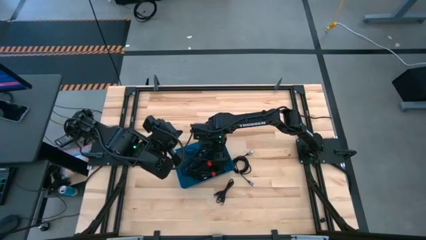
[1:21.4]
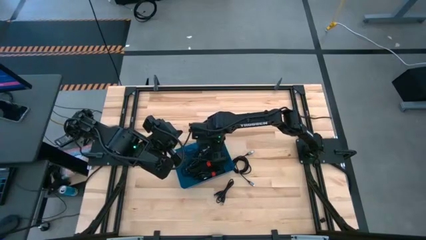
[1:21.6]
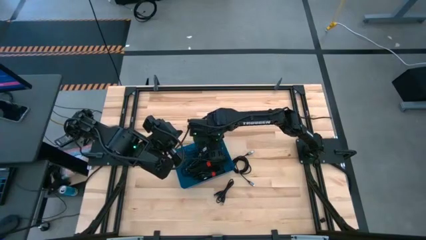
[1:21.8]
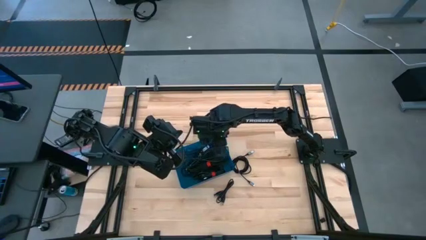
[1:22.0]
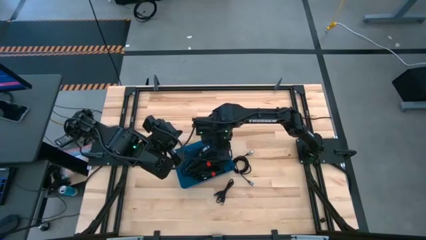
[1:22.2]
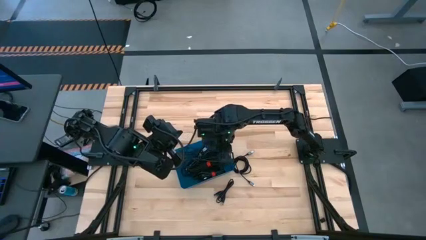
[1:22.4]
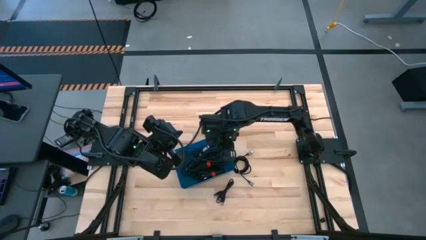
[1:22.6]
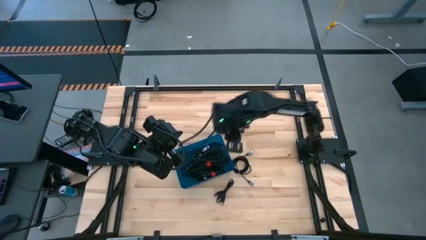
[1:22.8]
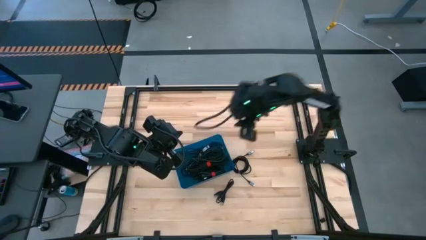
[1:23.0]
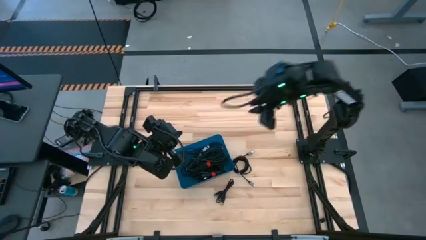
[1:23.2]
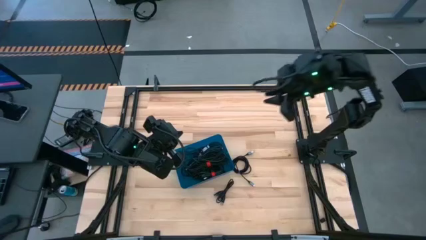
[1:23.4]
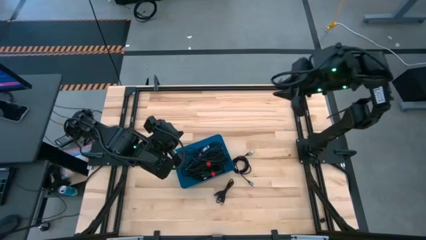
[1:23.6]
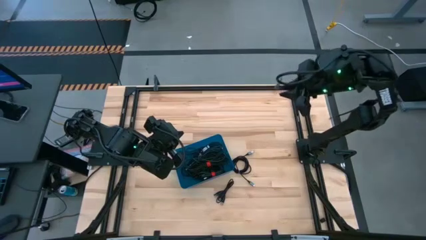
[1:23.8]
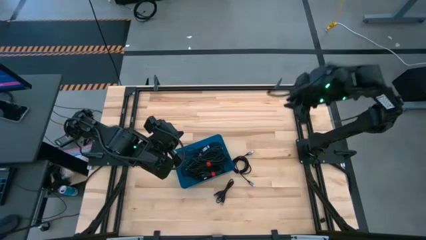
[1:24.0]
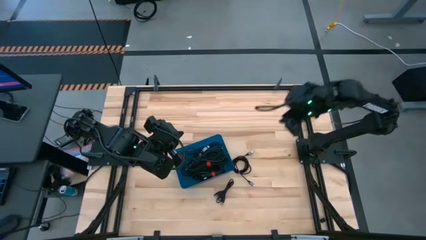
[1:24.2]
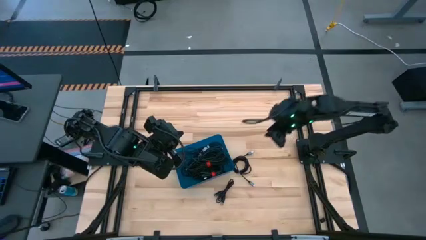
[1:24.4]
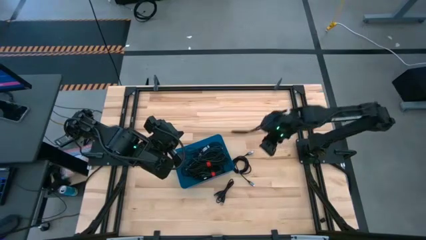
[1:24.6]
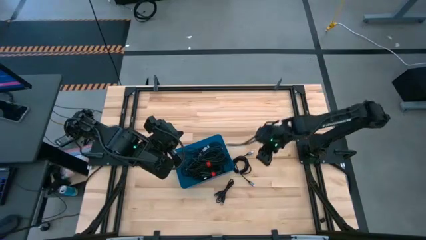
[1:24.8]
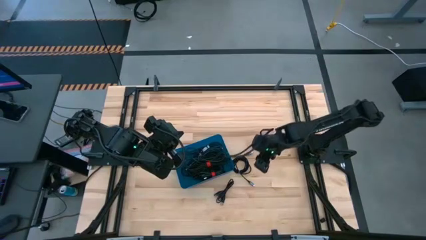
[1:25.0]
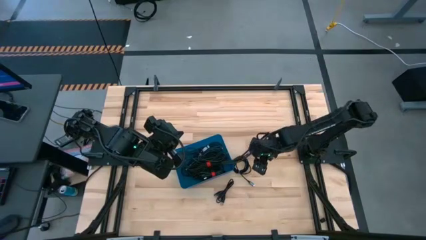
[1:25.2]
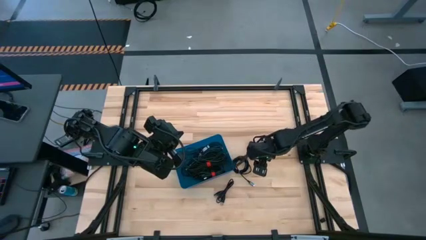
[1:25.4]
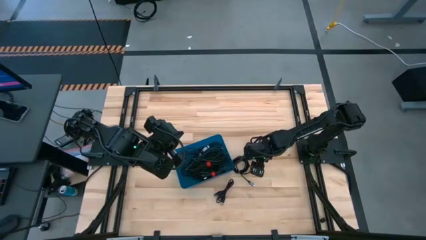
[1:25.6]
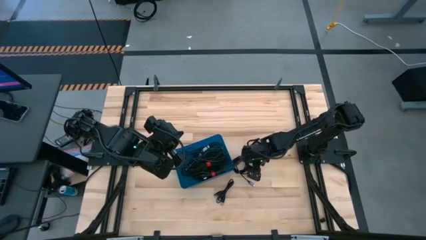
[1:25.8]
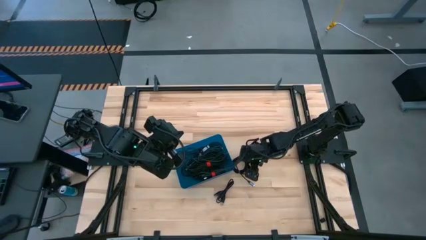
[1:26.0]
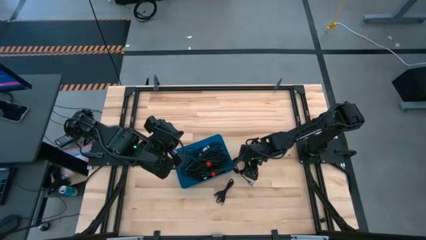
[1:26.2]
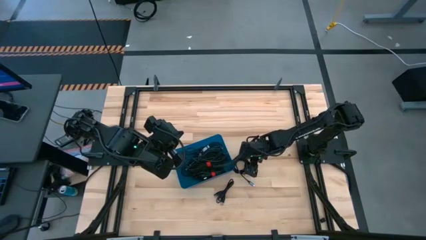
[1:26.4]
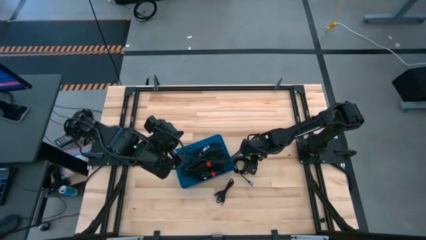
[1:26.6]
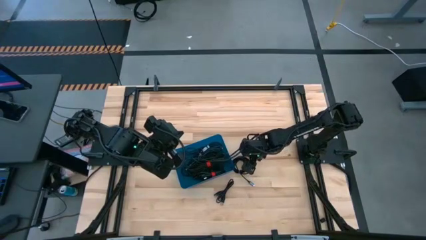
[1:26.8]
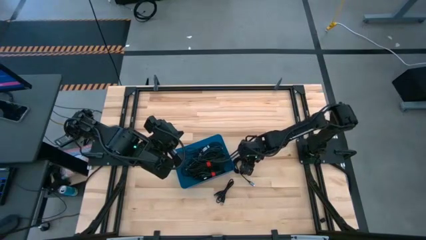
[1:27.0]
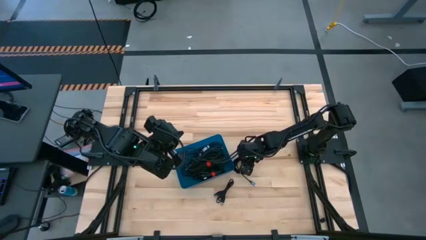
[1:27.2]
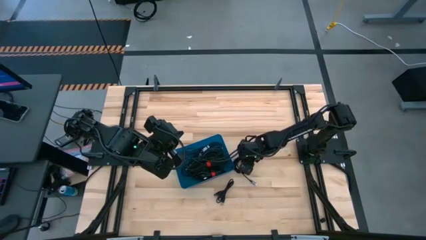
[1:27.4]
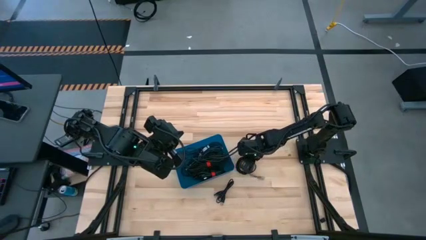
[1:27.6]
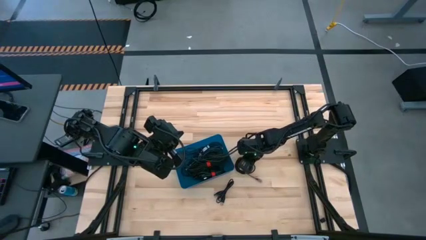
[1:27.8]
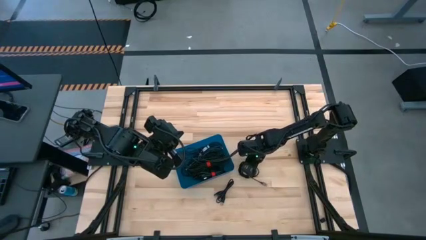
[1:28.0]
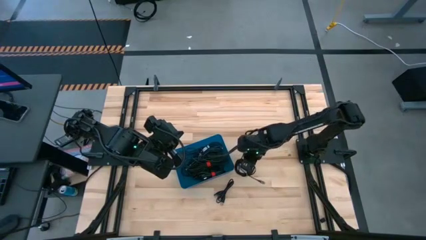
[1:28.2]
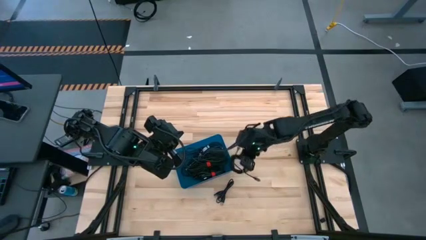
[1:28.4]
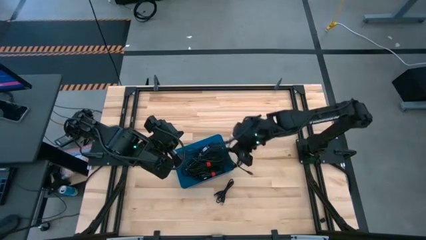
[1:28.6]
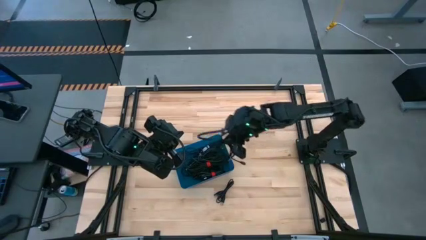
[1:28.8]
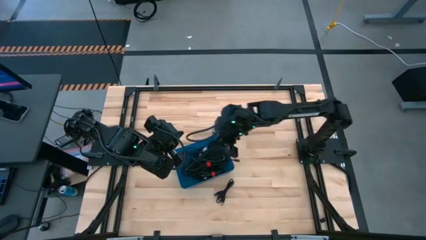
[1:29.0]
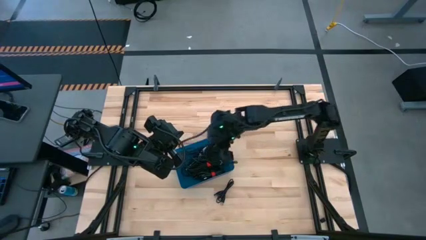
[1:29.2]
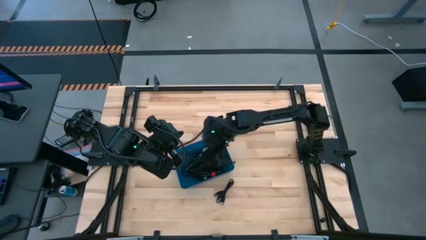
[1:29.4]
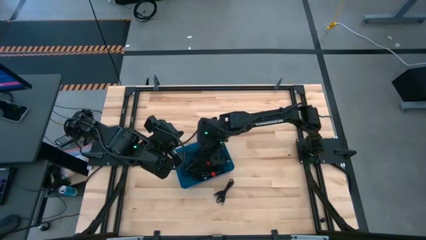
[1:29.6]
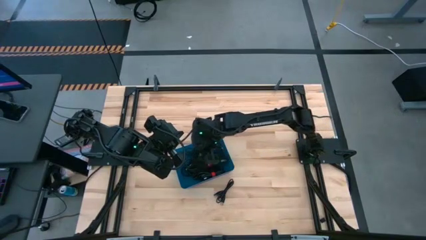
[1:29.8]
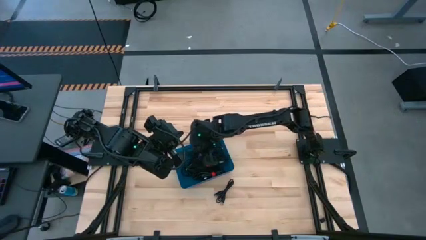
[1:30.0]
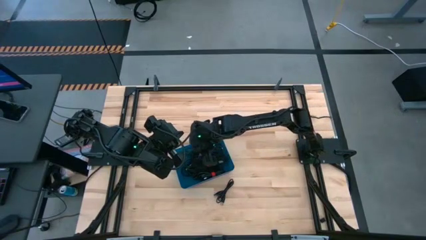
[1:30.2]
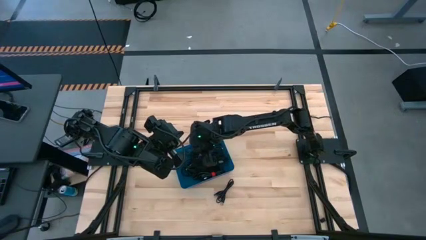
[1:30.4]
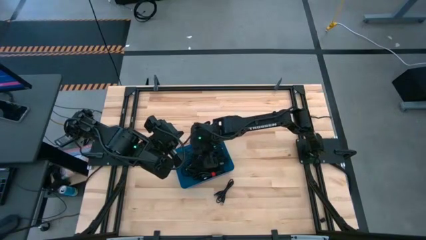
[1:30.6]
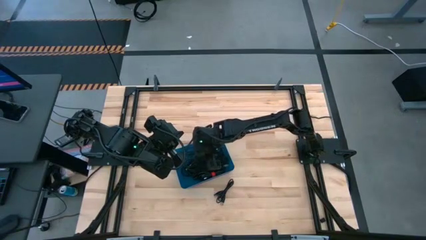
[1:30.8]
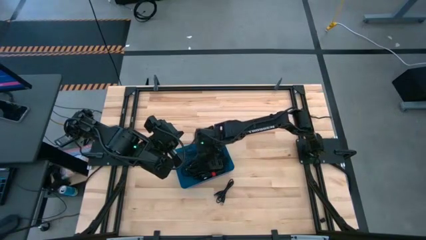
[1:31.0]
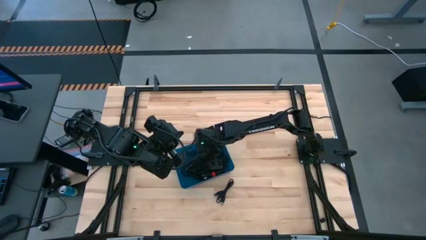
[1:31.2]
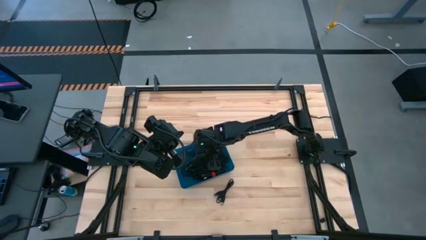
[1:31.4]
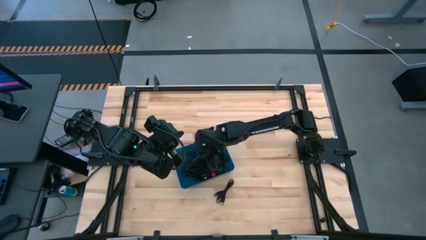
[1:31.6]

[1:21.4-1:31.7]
Task: Pick and place USB-C Cables
Put the black charger cable into the blue bin

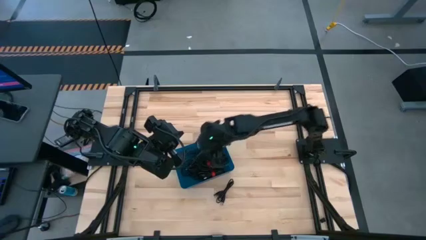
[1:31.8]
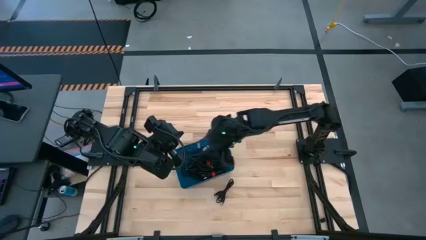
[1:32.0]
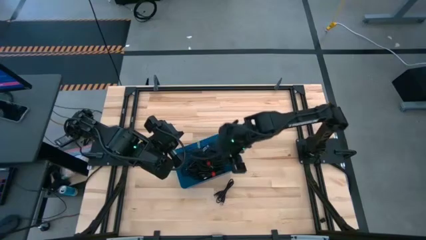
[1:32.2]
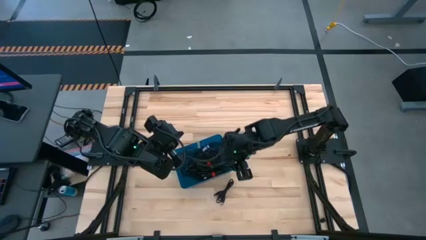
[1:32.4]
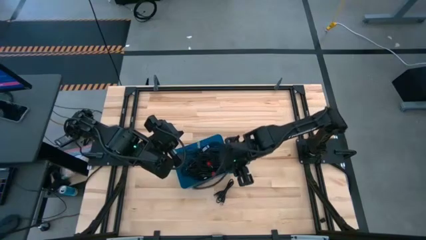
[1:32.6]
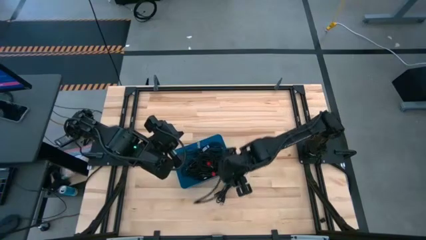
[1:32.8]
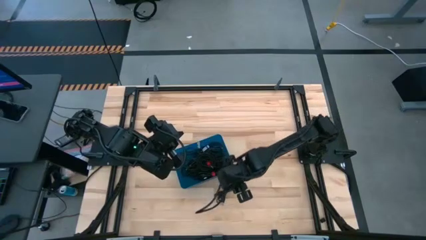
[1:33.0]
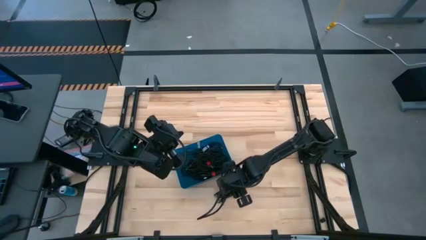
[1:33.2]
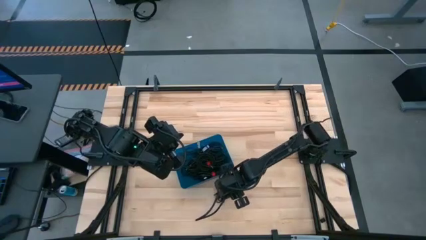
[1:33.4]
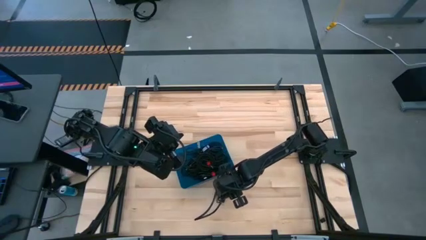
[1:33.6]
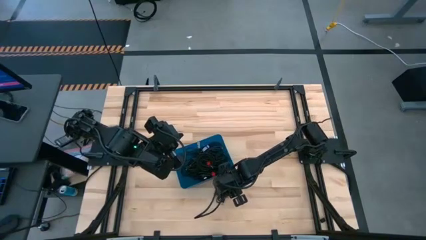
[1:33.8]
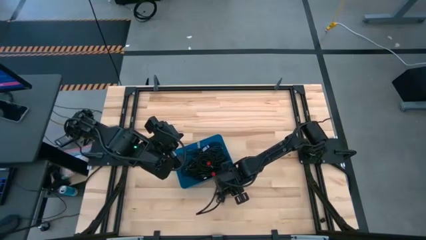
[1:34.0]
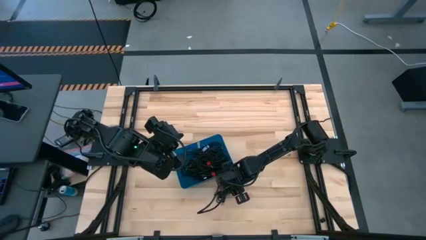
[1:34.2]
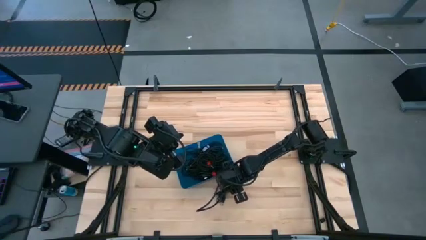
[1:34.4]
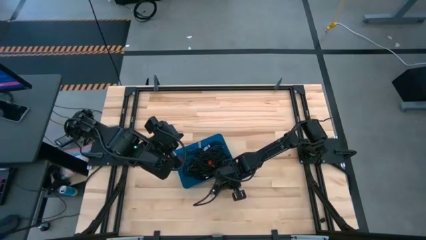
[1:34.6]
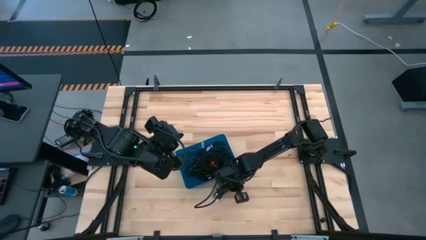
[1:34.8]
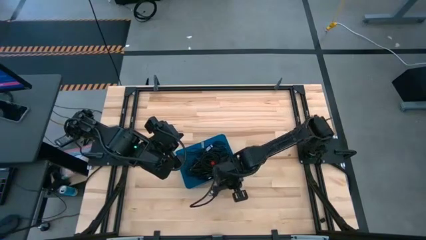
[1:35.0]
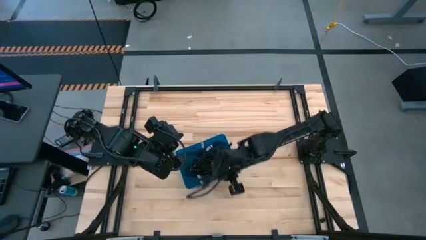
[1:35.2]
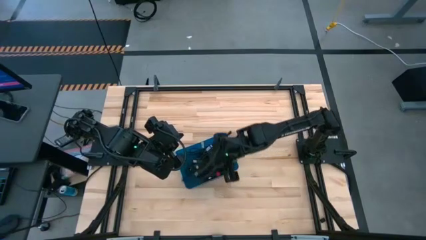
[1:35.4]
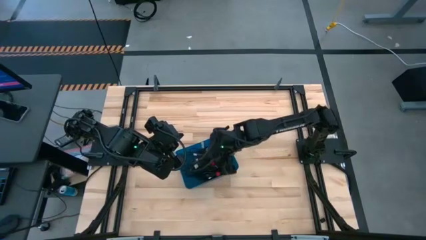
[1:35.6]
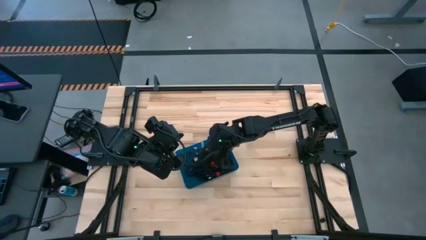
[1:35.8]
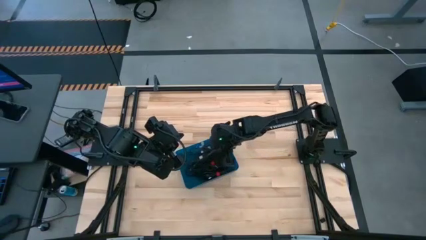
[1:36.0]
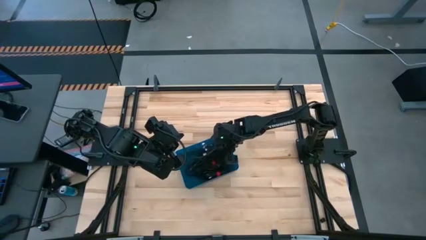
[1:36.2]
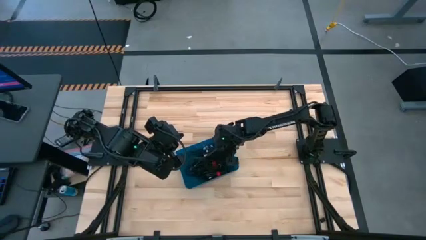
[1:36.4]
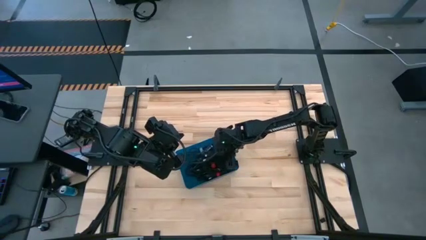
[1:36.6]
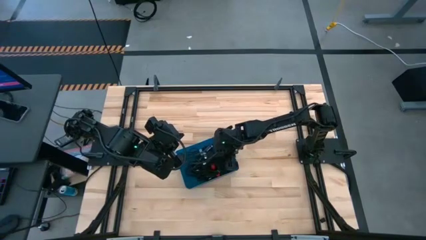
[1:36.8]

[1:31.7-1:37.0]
Put the black charger cable into the blue bin
